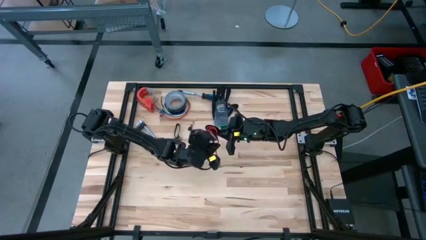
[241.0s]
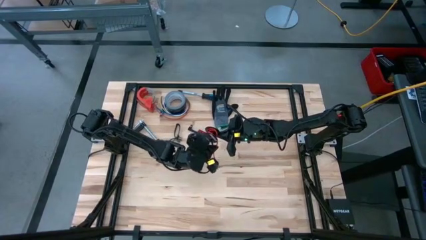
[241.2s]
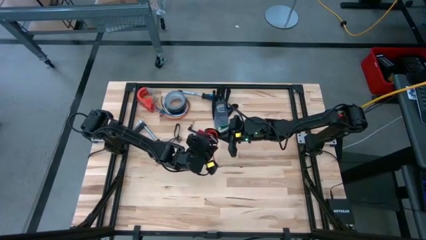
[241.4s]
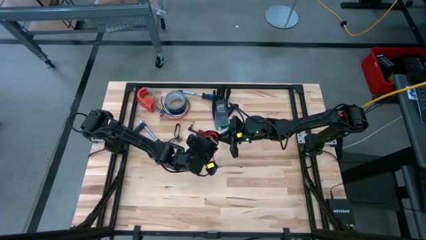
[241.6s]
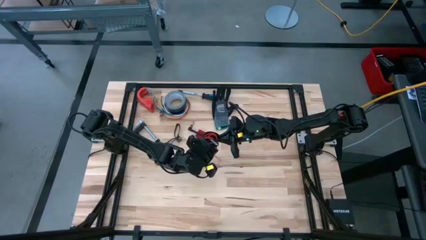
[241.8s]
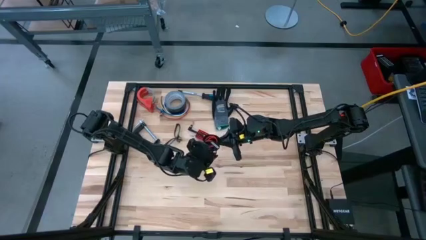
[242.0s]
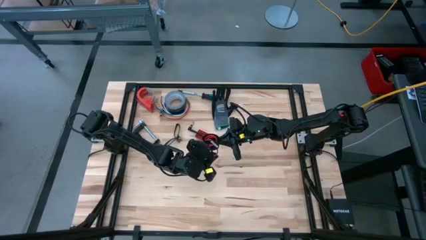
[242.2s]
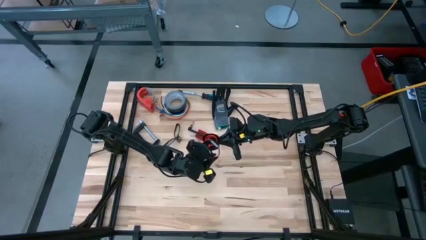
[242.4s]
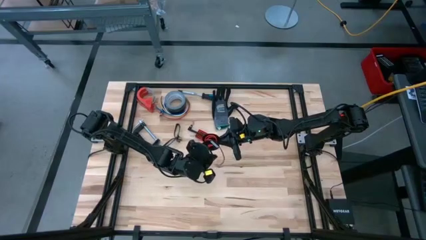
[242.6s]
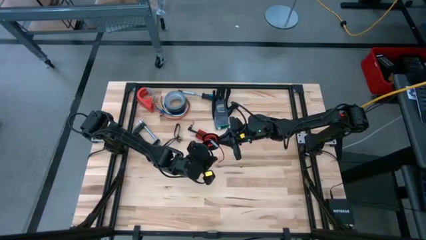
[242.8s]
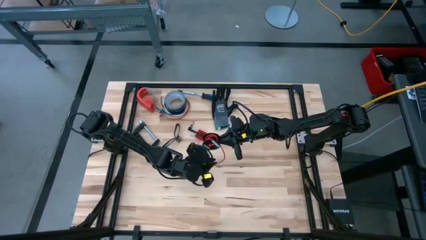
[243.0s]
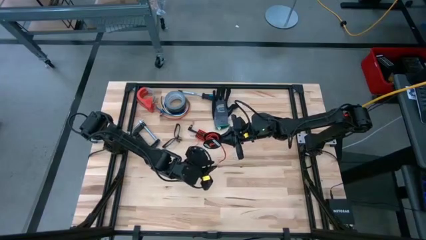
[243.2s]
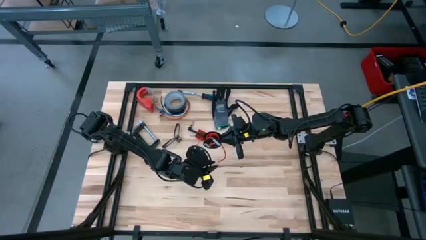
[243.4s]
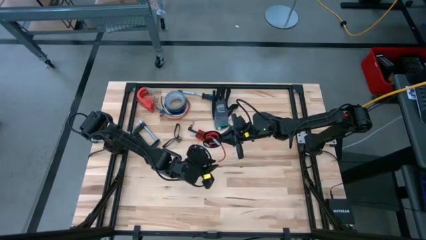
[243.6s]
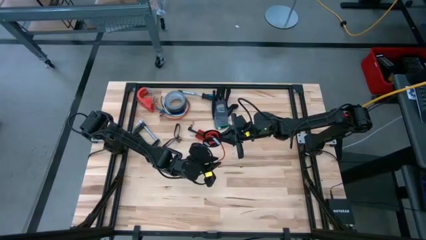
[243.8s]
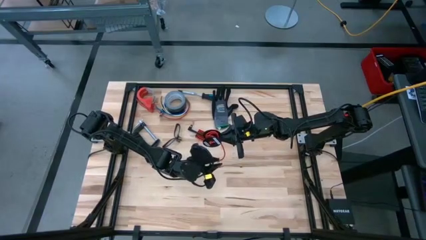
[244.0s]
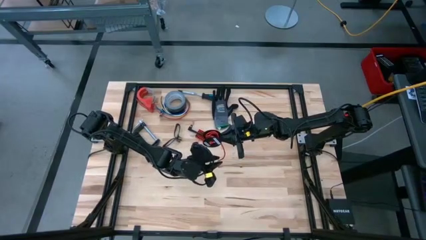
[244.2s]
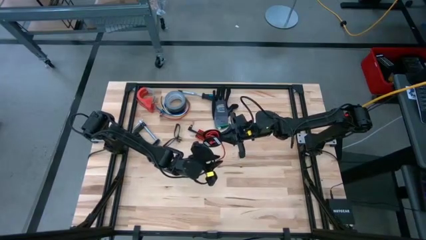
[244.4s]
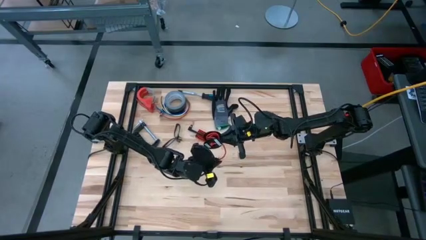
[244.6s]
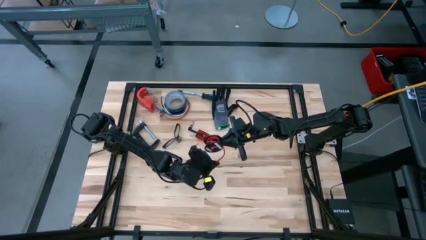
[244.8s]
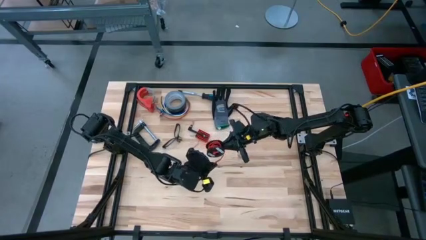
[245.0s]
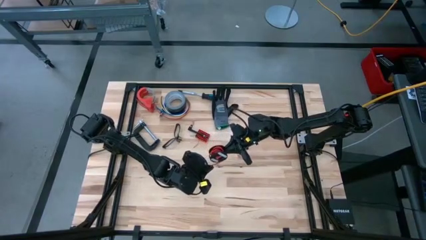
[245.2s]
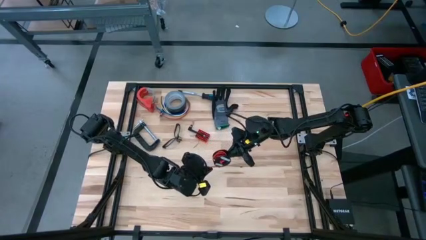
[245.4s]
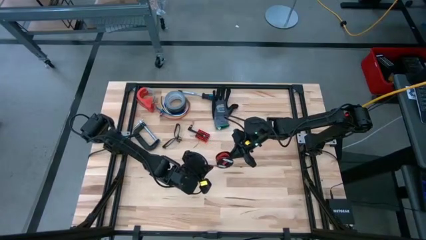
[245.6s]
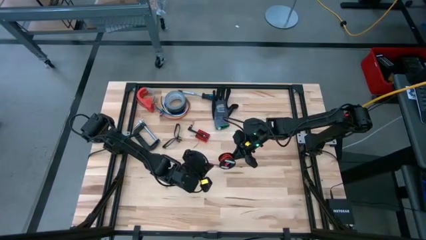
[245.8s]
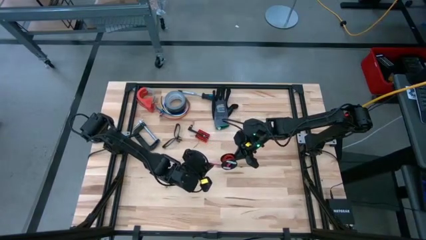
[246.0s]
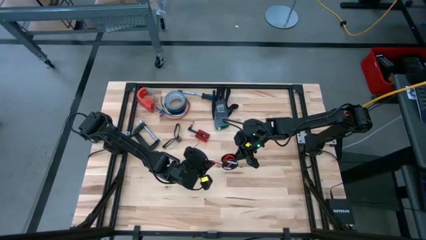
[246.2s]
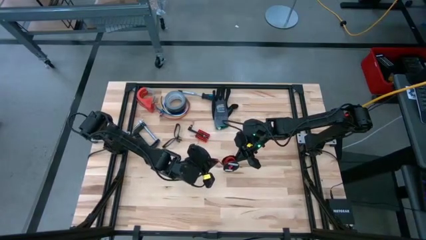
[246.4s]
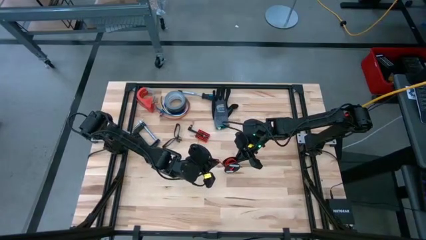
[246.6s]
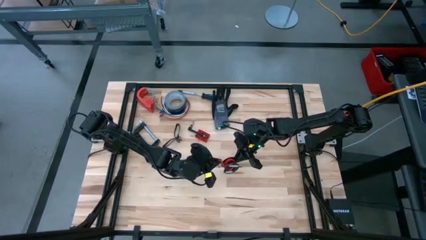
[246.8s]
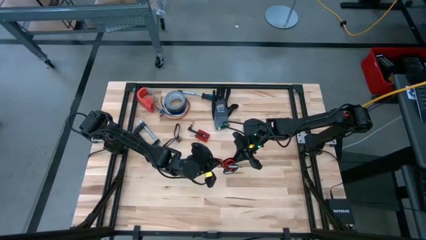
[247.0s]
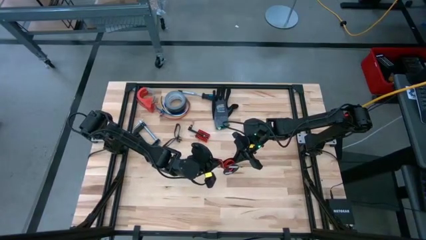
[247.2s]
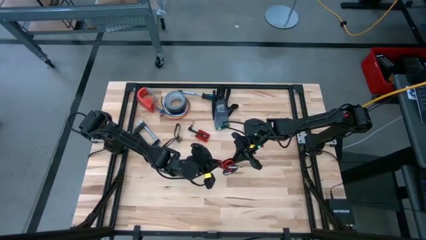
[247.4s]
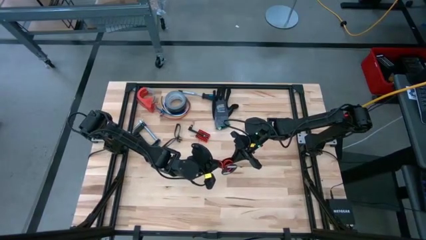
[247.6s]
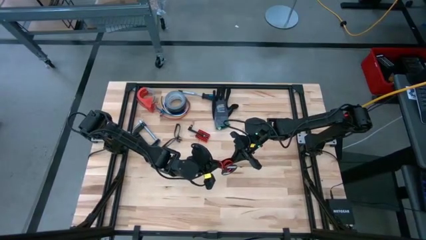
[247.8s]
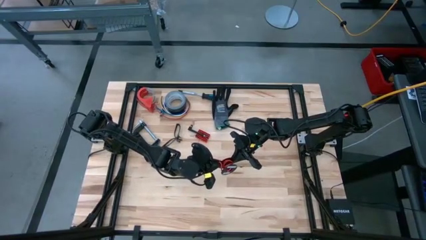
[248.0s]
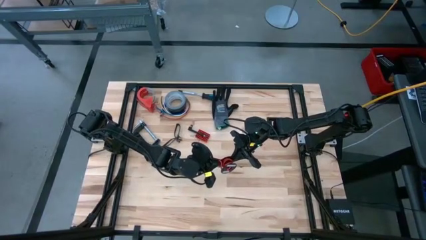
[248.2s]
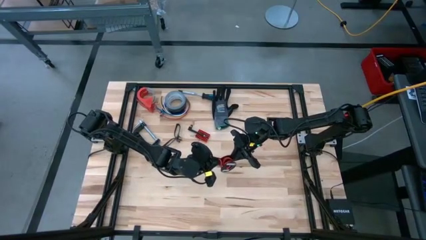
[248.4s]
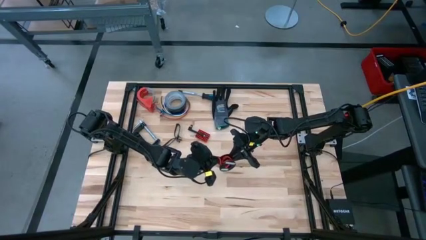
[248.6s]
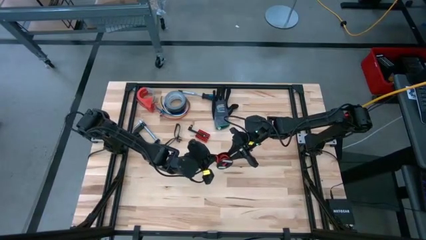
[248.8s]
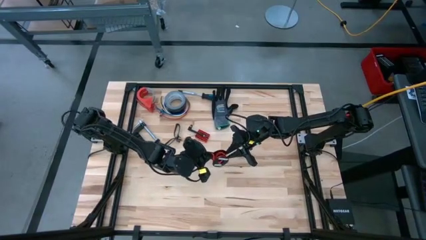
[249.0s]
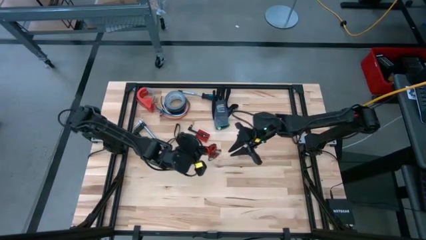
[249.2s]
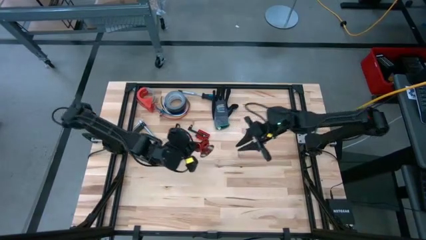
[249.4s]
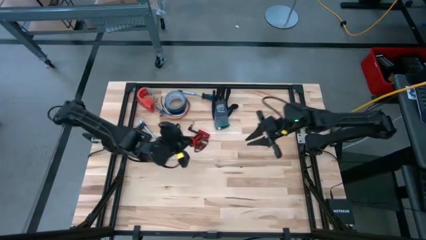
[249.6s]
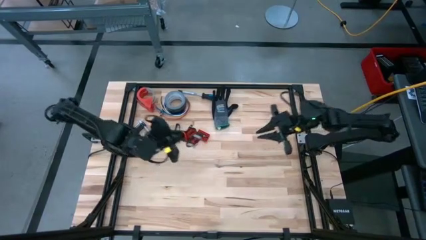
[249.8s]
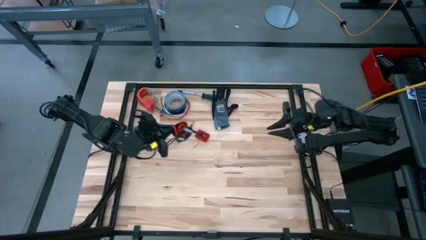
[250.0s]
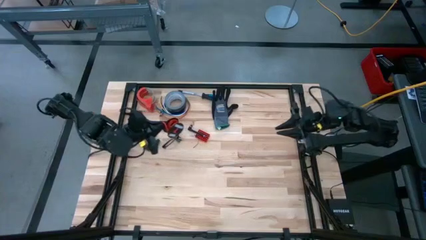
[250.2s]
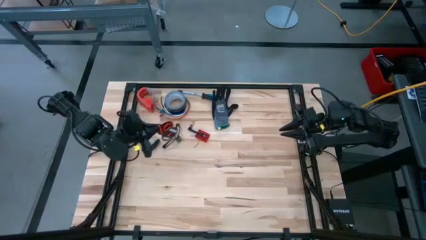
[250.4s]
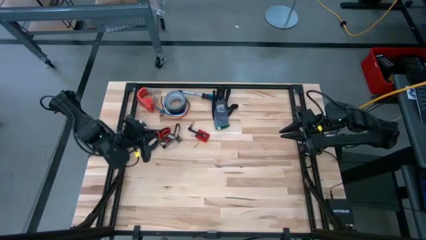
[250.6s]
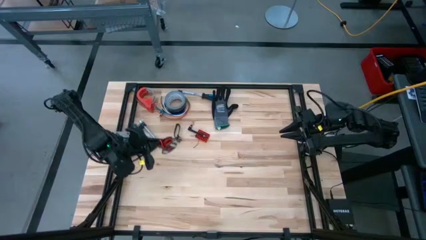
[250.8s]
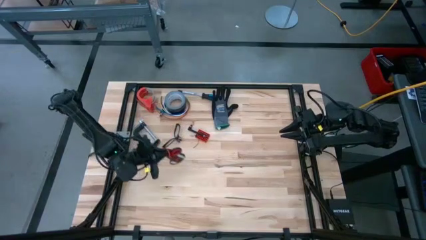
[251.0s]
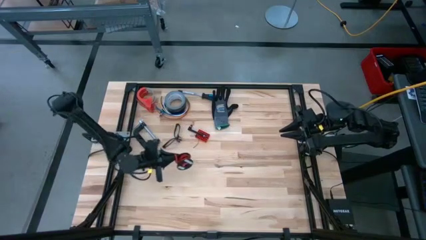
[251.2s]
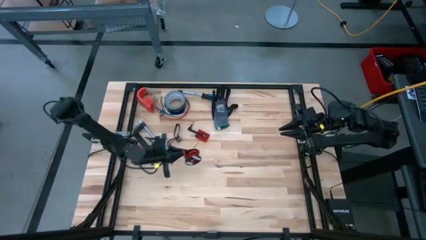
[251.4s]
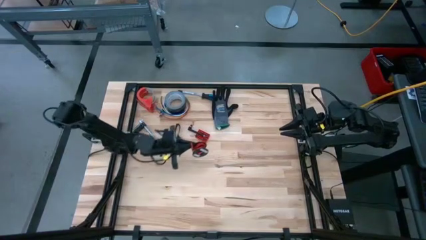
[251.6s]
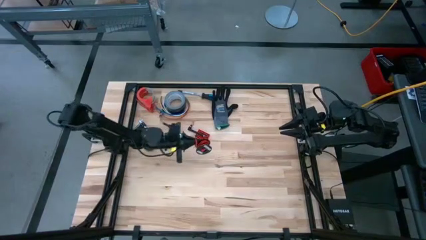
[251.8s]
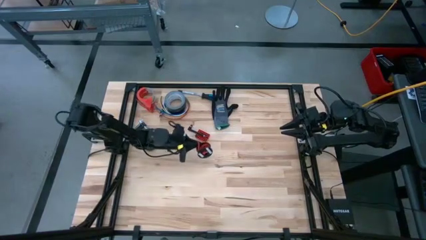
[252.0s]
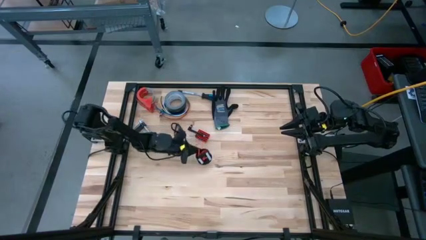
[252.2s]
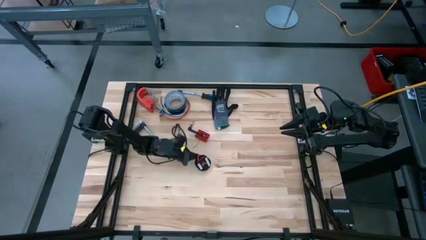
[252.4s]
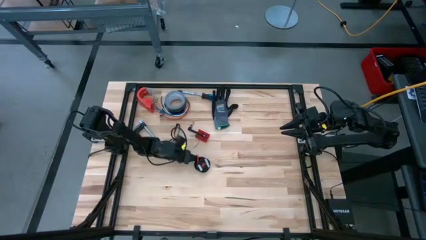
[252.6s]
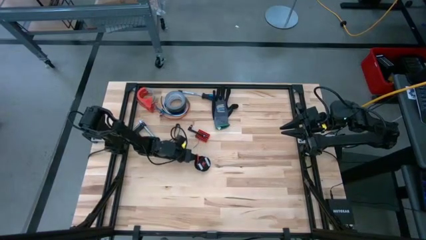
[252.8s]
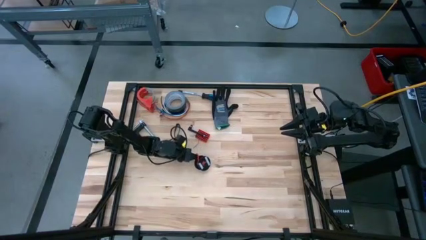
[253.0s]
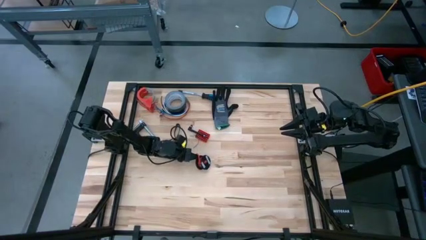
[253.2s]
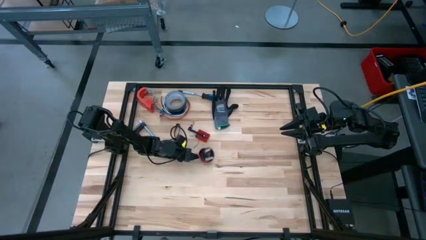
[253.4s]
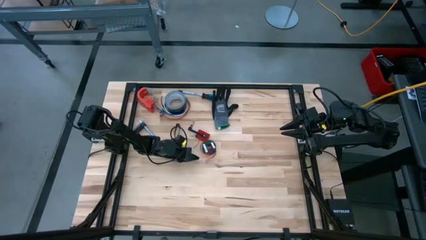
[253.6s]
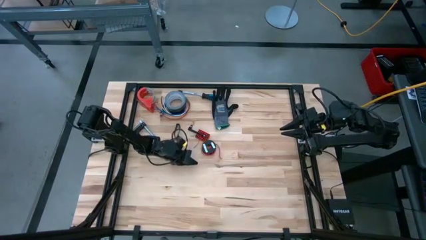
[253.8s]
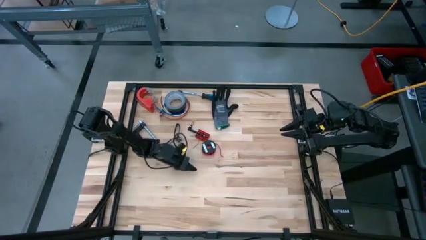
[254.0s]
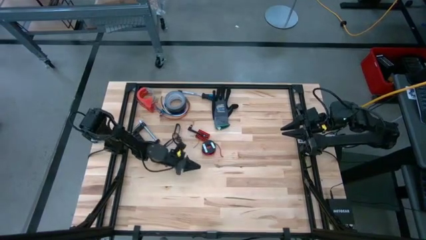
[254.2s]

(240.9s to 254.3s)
Task: Coil cords
Coil the orange wire into the black spool

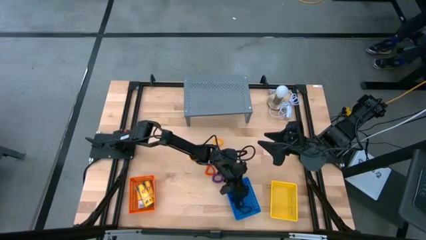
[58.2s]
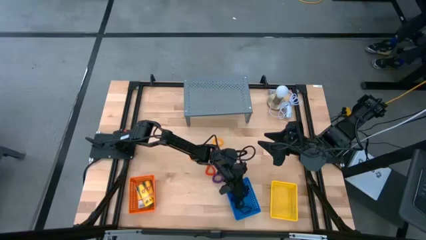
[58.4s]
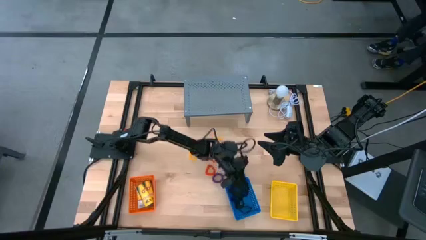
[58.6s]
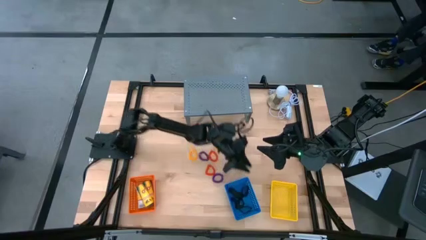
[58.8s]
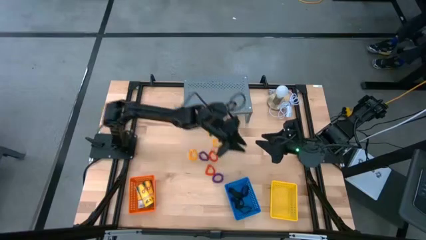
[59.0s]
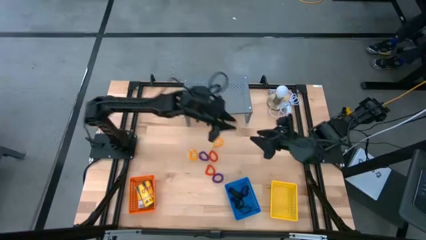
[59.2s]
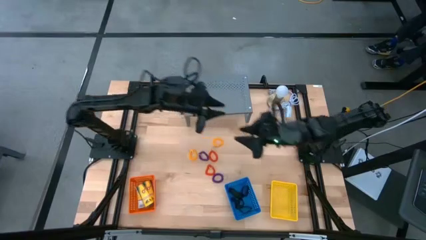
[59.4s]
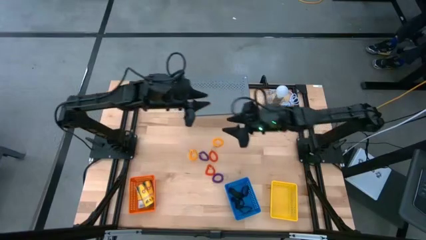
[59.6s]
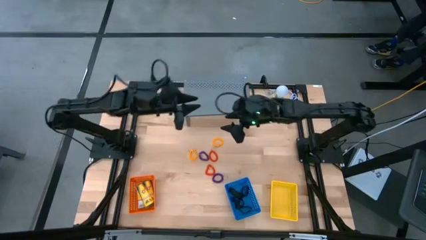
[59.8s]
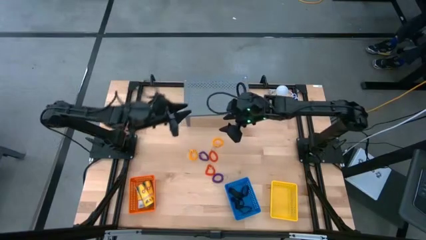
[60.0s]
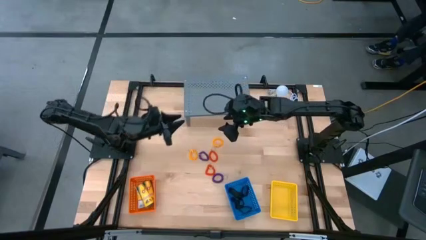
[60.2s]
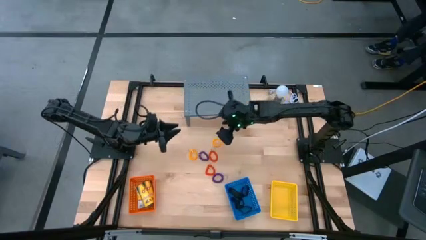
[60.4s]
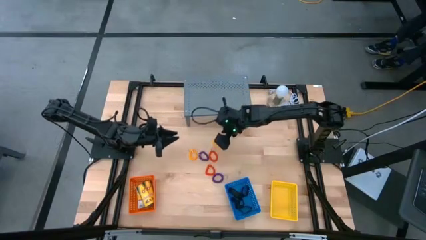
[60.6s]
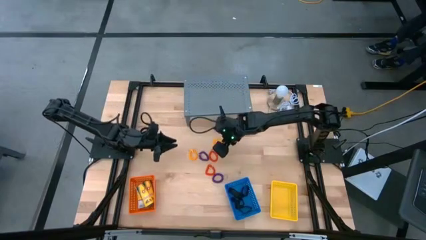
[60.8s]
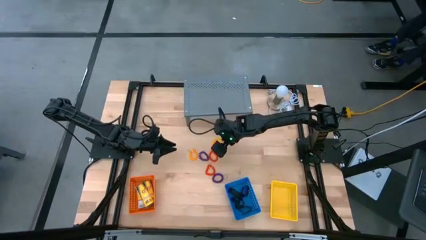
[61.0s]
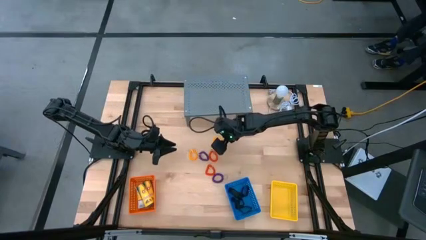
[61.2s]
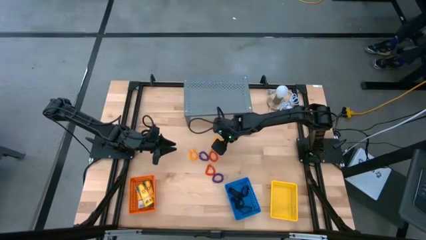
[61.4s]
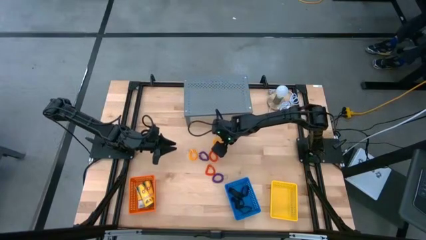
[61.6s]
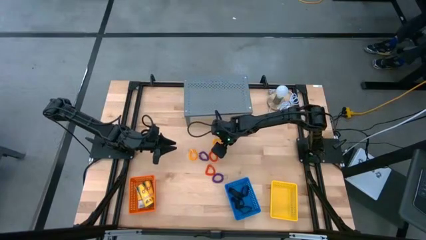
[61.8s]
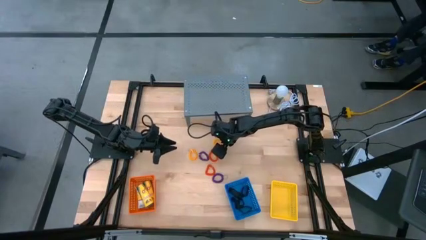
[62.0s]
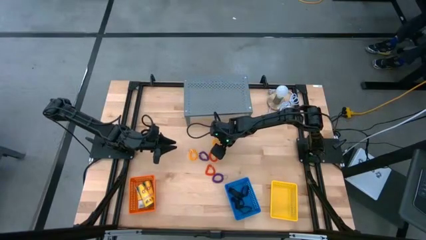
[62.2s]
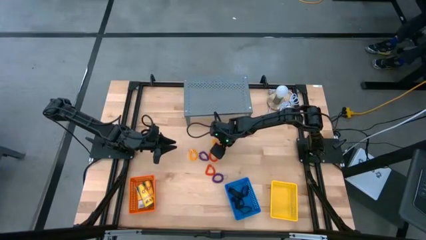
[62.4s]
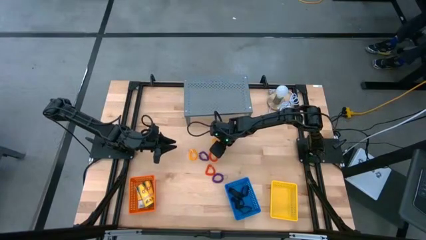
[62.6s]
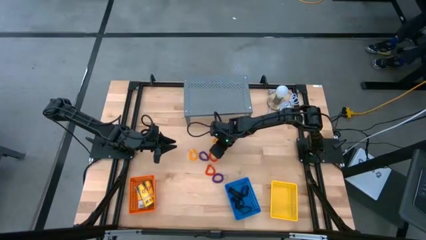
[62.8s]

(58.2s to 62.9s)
Task: Pick & Place Office Desk Supplies
Put the yellow spring keychain into the yellow bin
